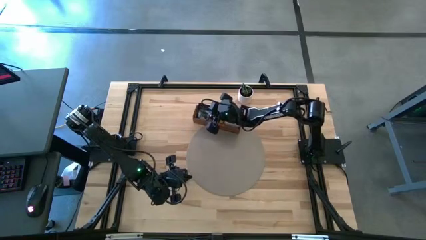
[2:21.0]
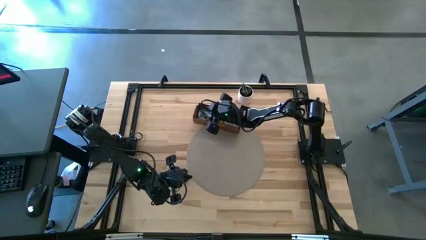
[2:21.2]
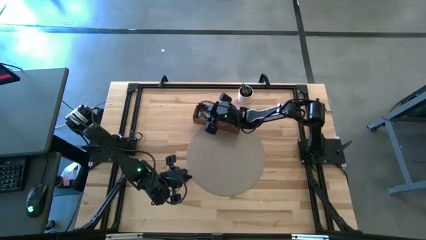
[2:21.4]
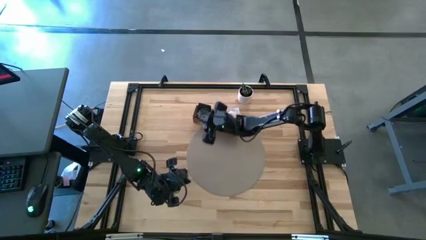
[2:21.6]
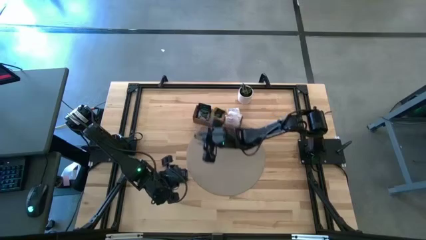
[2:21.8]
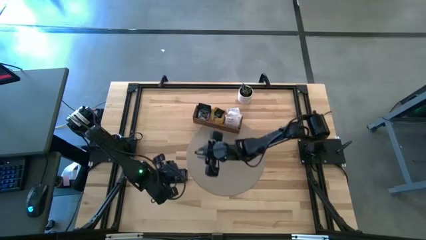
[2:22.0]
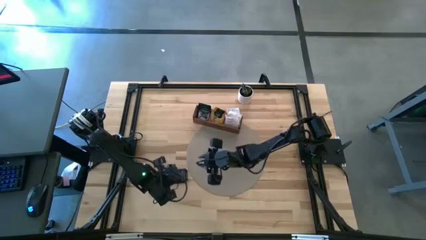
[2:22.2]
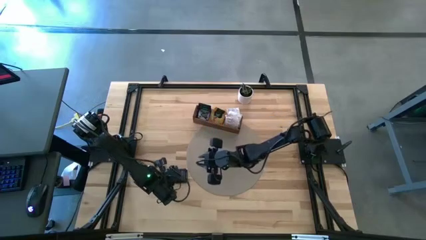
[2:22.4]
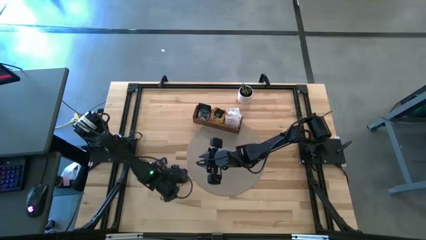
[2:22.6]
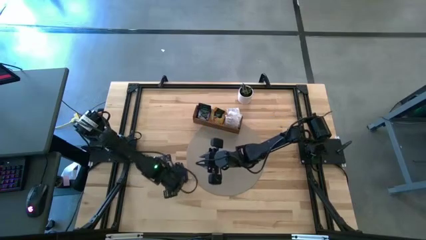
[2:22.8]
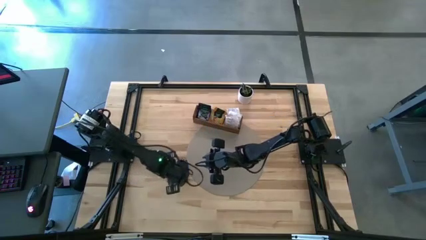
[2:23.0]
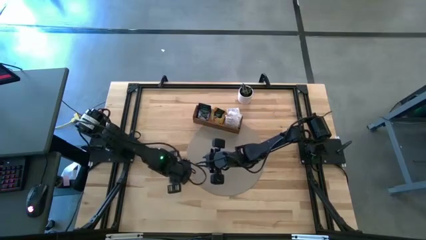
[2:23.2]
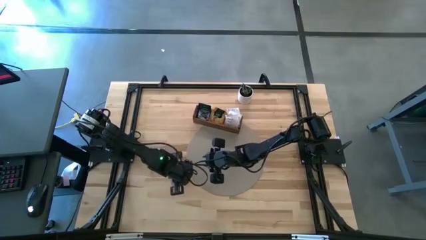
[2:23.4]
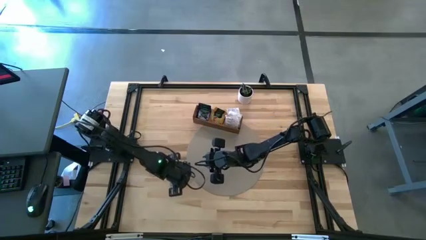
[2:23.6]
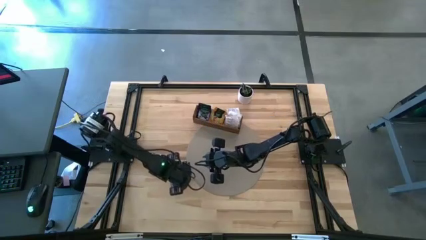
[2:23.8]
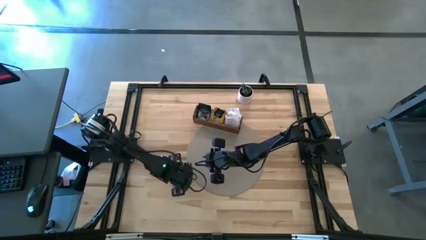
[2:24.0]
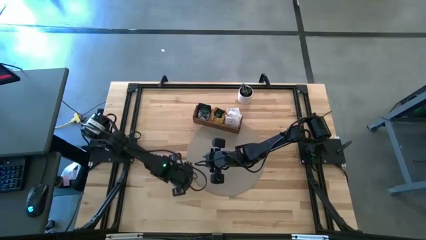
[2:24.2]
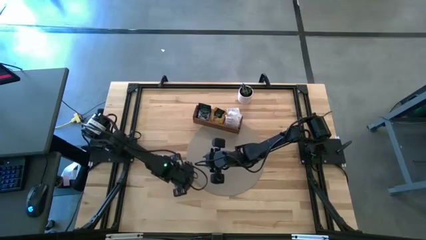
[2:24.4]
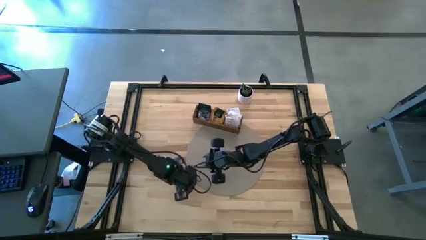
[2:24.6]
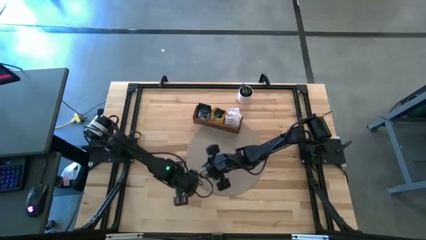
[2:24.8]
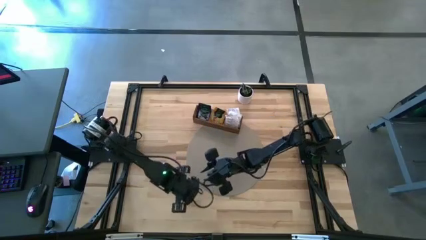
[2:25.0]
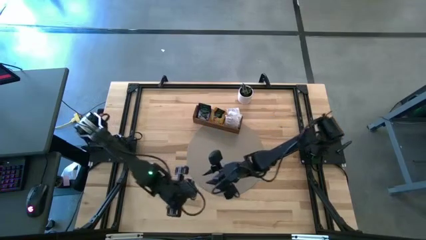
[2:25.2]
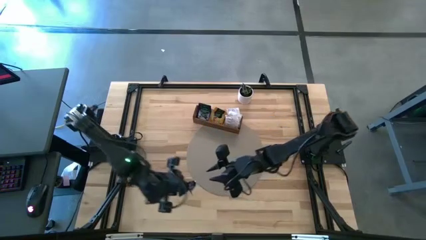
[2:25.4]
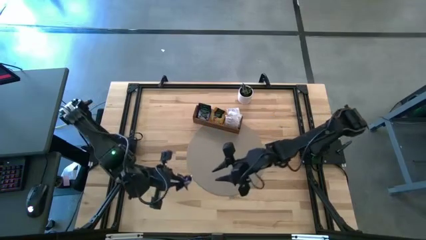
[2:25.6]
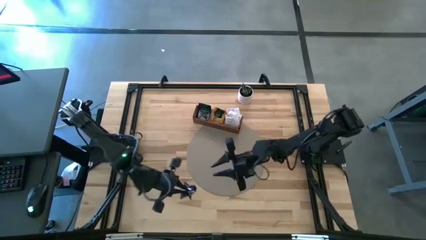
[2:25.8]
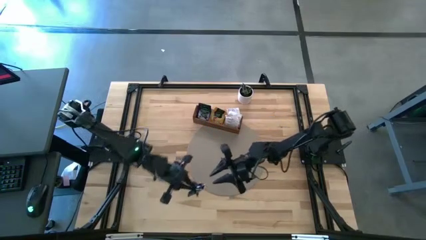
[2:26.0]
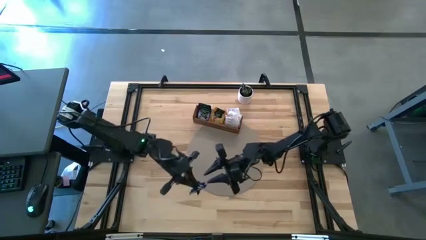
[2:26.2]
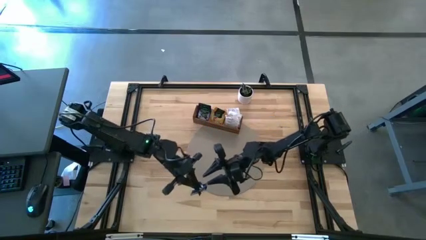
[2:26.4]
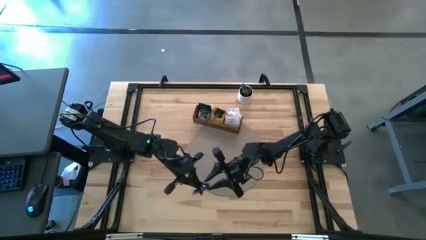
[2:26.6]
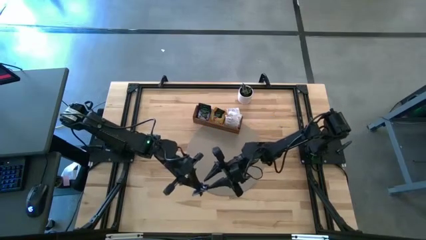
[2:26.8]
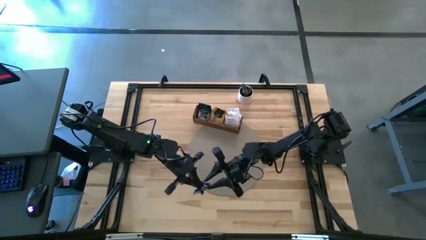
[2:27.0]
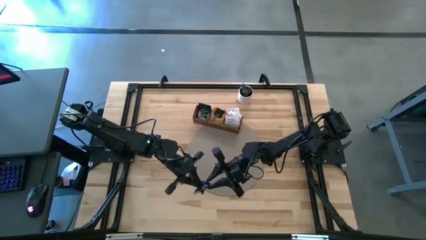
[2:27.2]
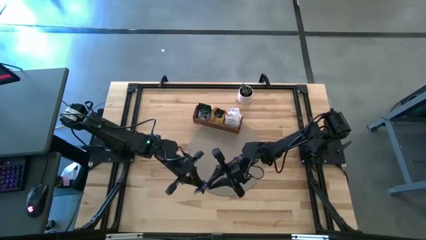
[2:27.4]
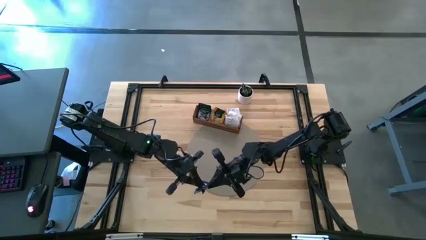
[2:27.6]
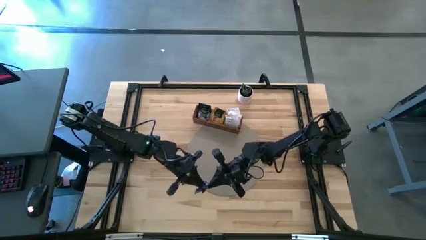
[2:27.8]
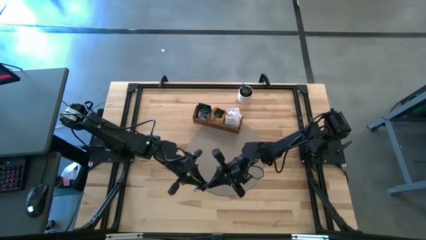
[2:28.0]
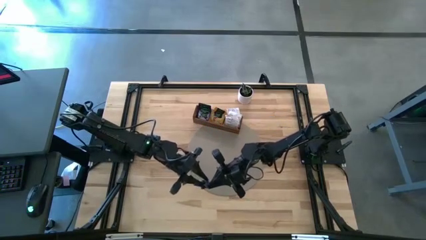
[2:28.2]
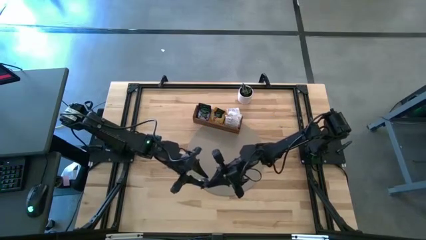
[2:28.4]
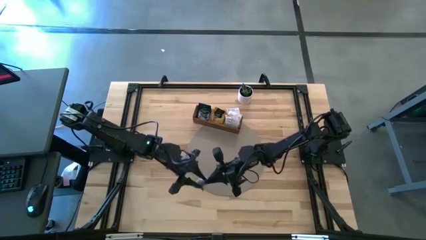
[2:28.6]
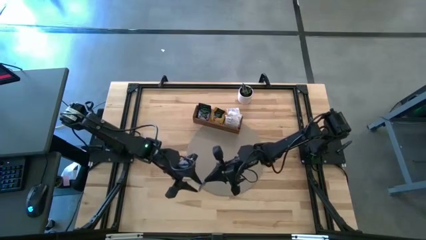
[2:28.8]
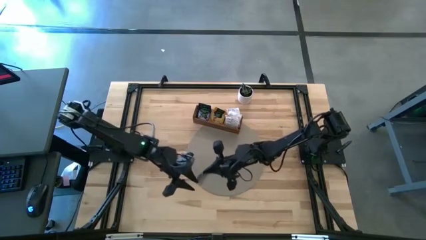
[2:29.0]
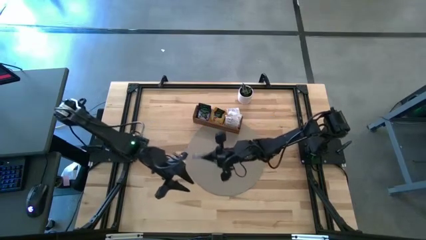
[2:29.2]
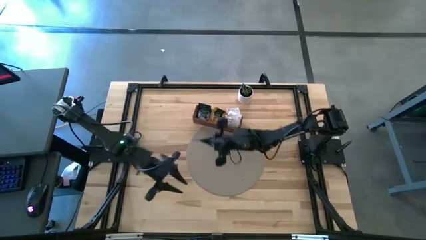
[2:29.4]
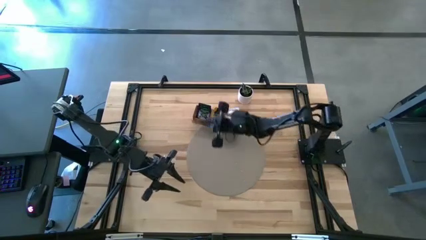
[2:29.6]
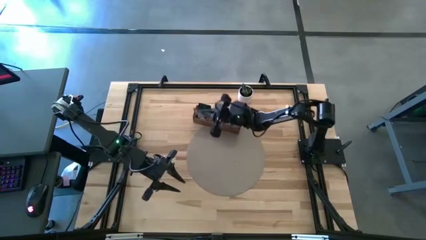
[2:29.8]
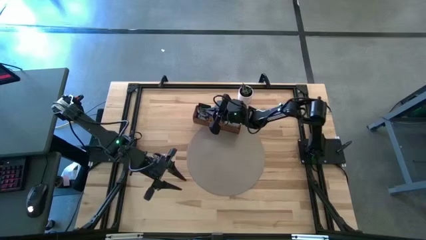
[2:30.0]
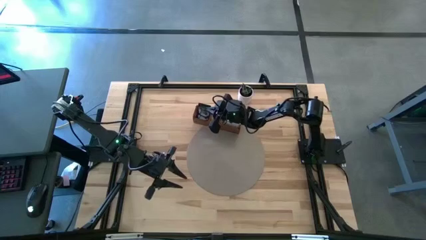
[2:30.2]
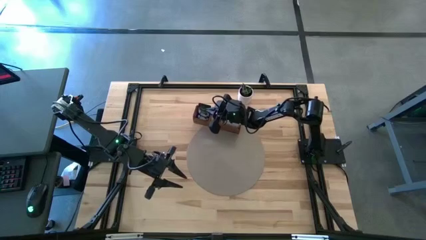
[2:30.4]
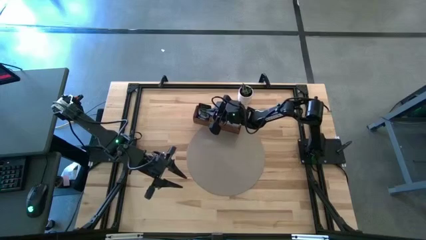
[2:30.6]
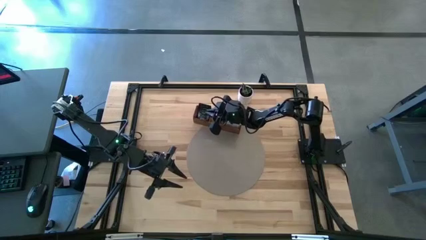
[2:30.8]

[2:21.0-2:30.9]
Task: Pick & Place Tea
Put the dark blue tea bag into the left section of the wooden organizer

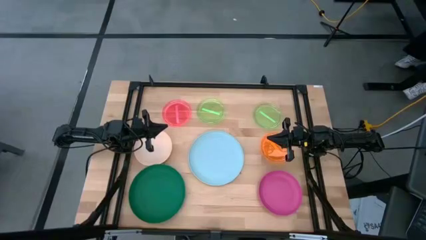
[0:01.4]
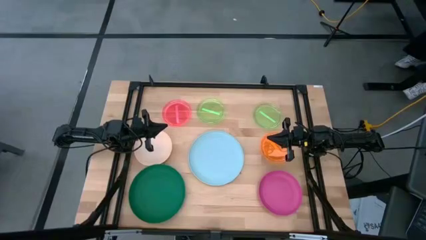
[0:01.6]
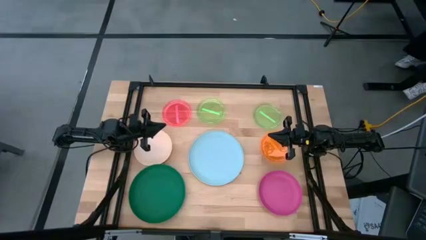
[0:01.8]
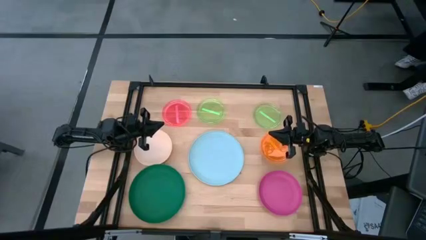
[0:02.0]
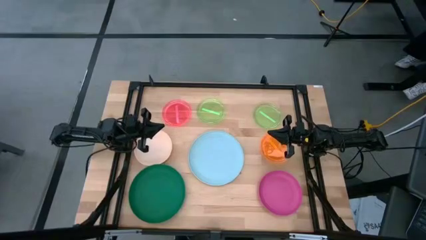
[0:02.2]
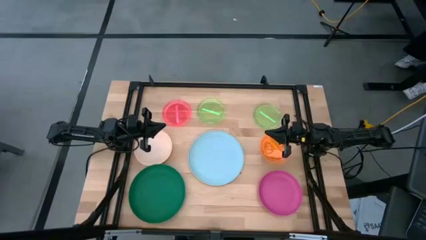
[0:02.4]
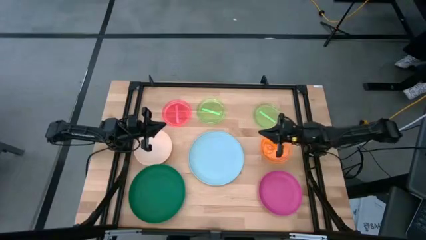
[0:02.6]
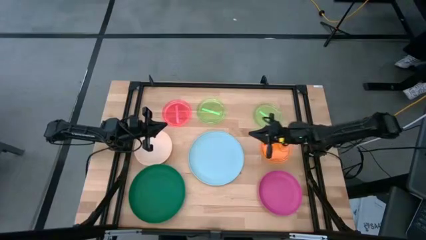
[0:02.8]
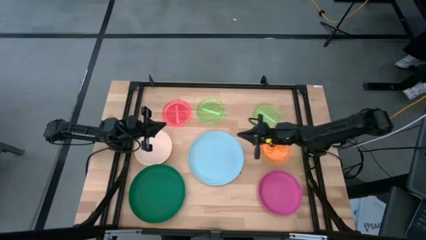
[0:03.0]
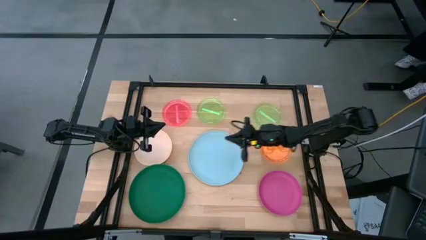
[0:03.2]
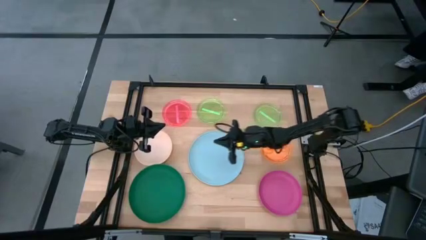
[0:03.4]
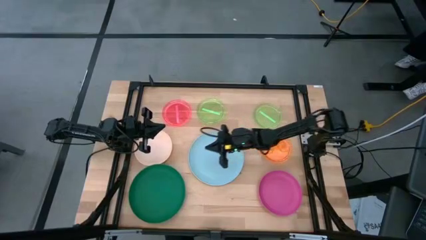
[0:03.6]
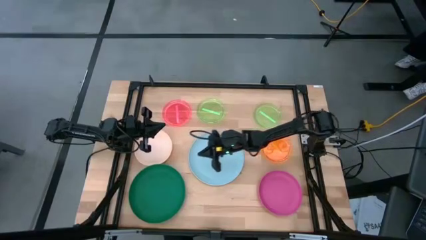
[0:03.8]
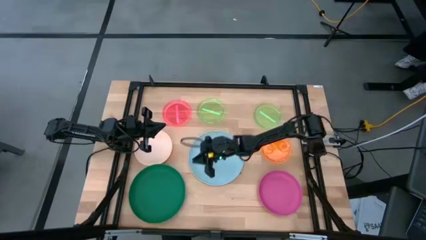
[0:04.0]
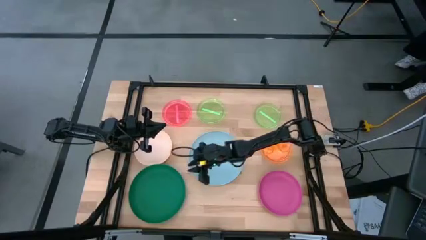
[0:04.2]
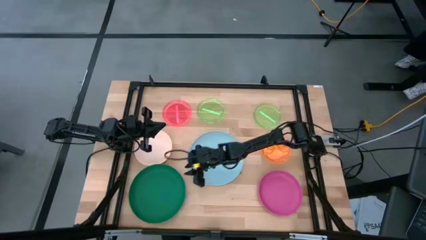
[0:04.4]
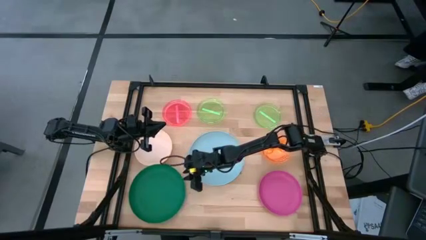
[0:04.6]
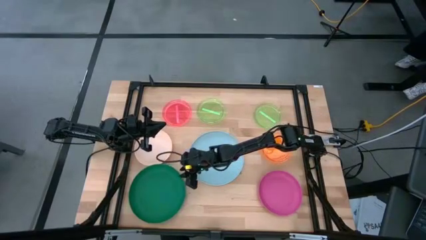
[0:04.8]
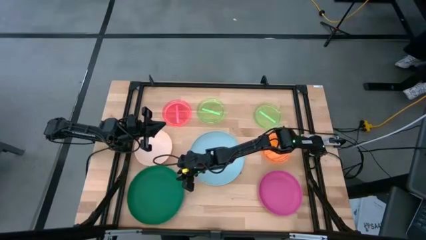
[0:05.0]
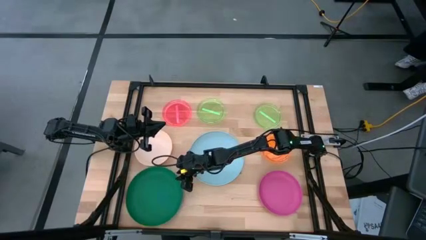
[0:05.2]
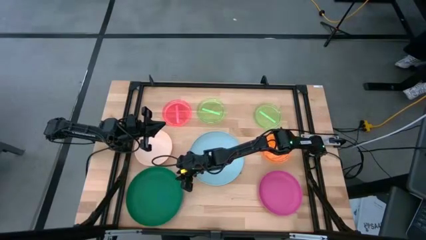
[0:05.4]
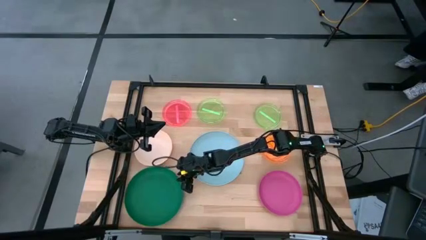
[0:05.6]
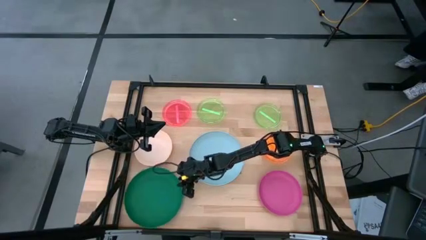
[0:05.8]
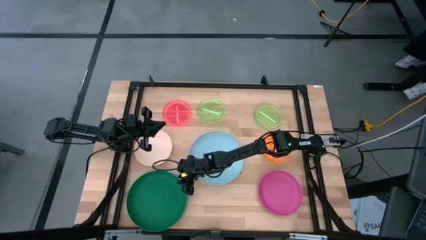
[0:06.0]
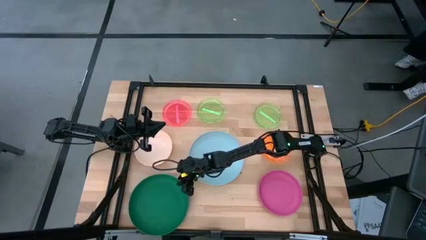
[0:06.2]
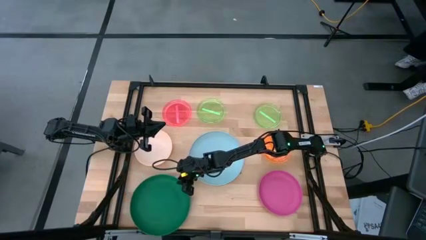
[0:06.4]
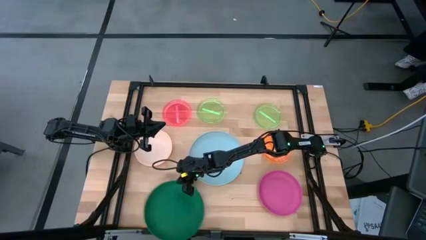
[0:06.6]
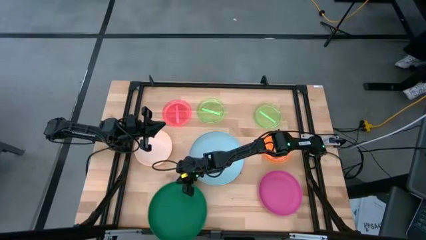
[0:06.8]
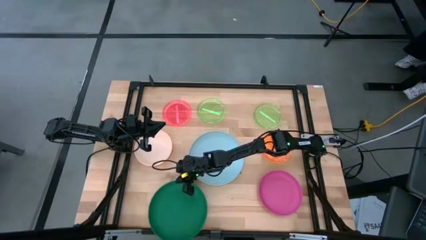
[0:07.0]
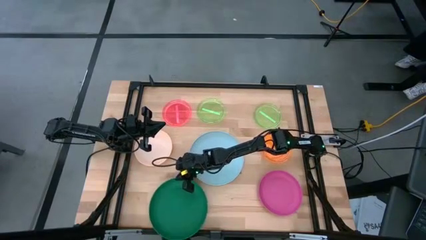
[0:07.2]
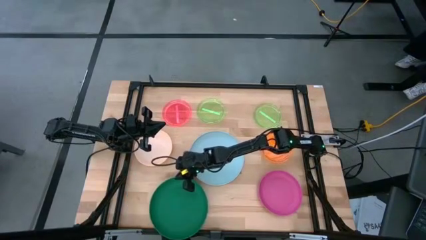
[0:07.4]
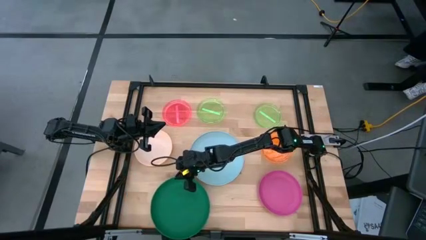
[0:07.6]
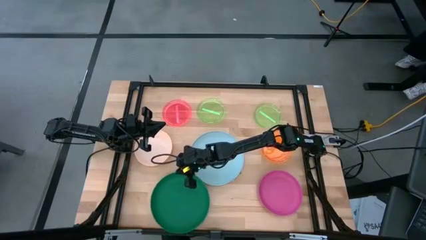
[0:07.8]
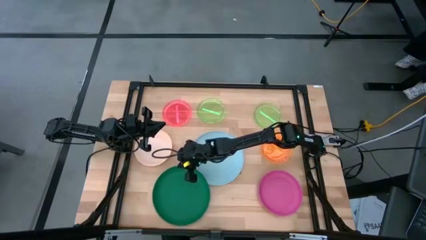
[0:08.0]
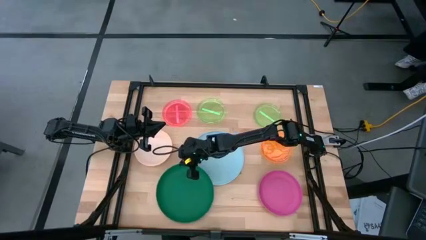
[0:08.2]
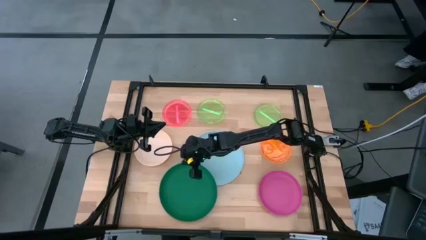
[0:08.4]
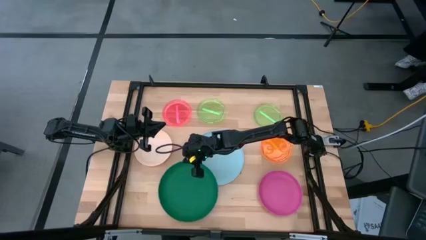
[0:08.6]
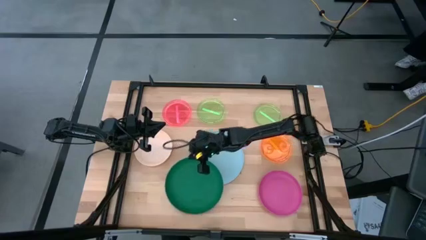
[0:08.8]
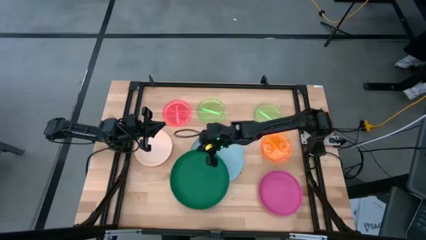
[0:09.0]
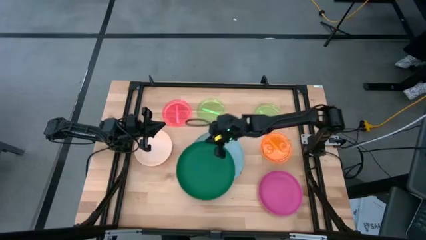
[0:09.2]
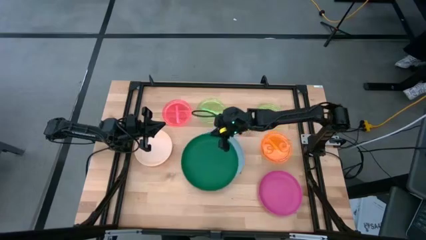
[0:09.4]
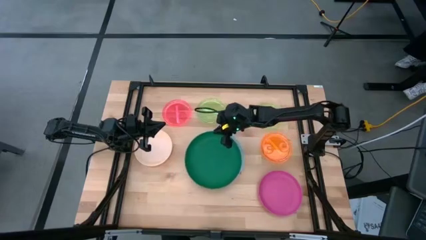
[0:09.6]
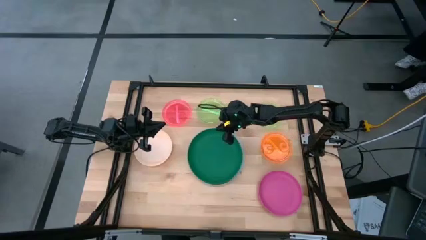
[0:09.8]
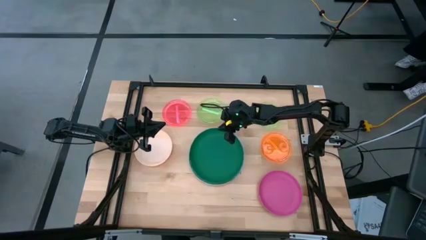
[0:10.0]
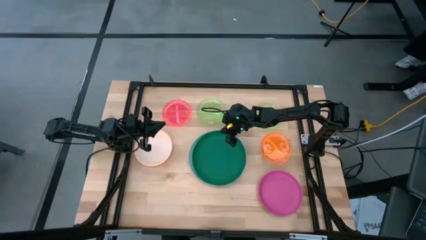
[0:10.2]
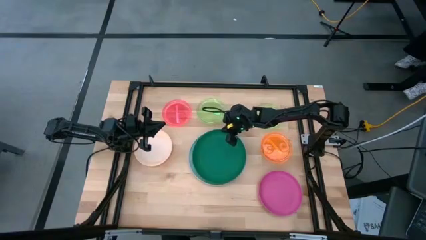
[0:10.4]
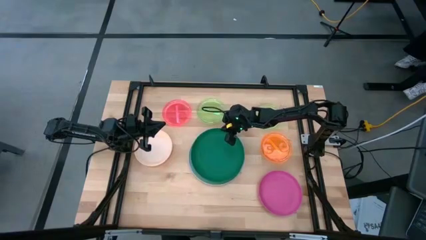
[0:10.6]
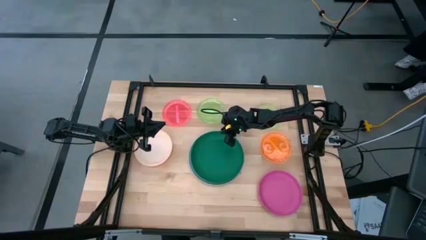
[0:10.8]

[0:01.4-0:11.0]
Task: Stack plastic plates
Stack the green plate on top of the light blue plate
